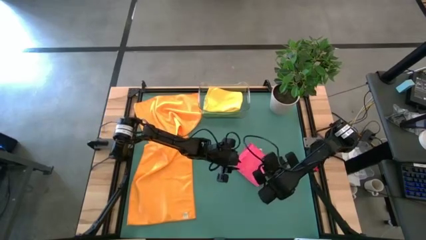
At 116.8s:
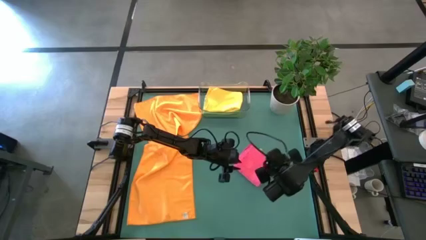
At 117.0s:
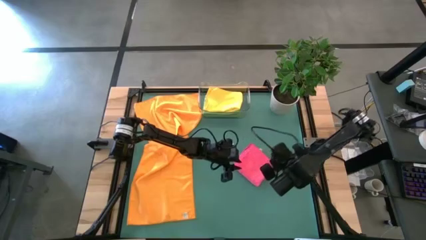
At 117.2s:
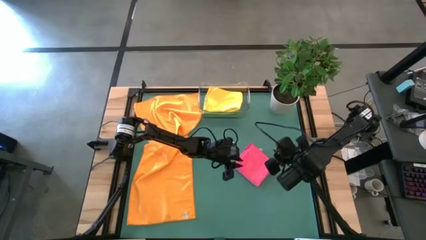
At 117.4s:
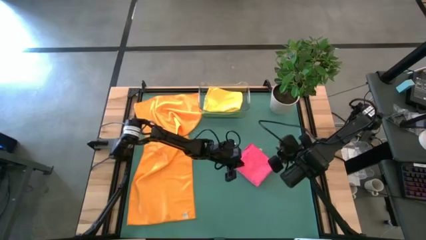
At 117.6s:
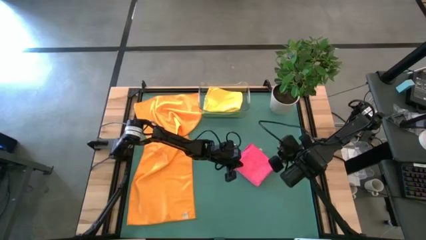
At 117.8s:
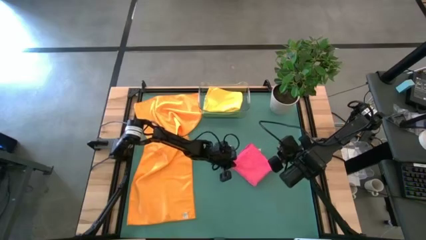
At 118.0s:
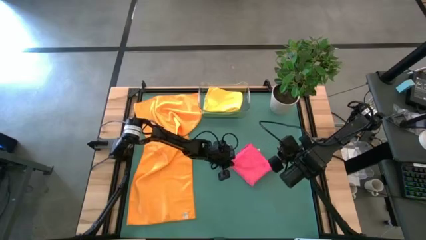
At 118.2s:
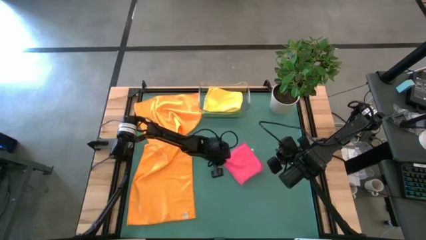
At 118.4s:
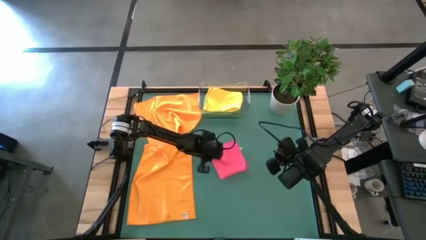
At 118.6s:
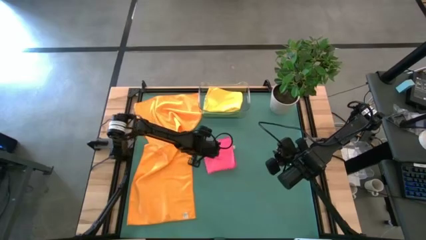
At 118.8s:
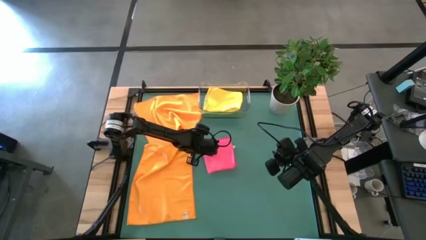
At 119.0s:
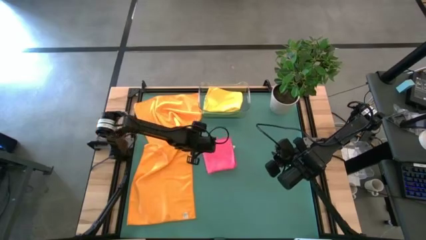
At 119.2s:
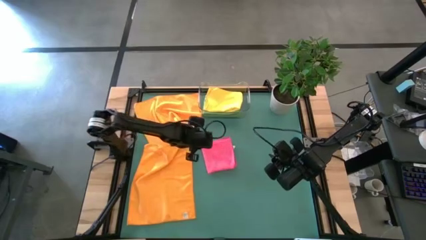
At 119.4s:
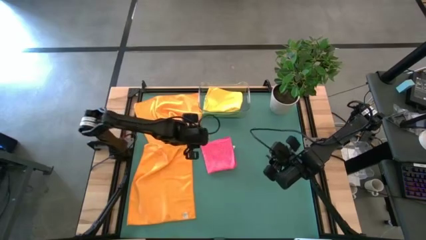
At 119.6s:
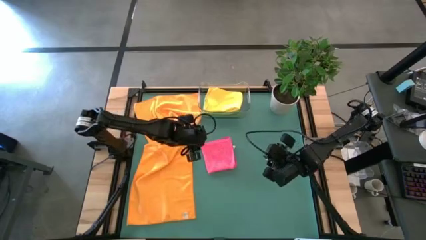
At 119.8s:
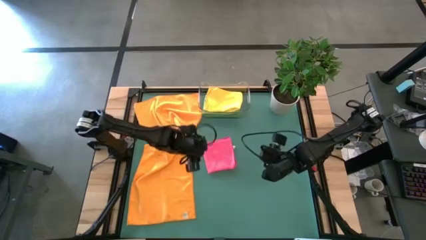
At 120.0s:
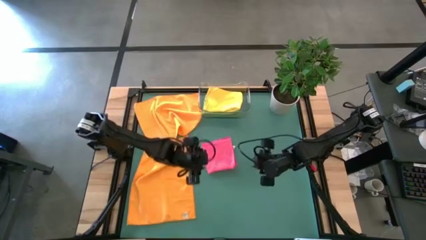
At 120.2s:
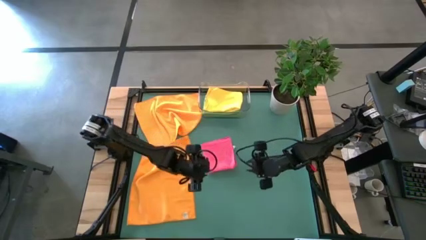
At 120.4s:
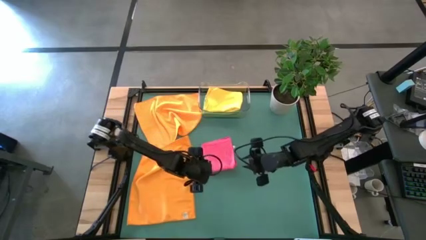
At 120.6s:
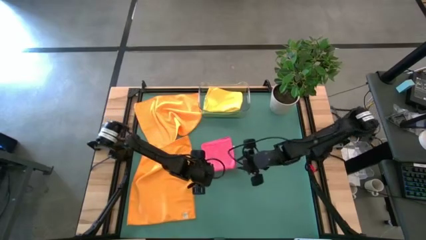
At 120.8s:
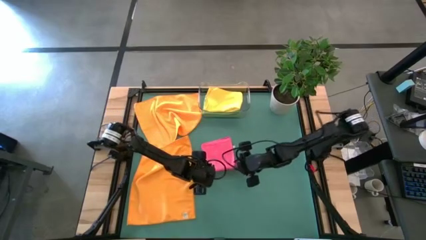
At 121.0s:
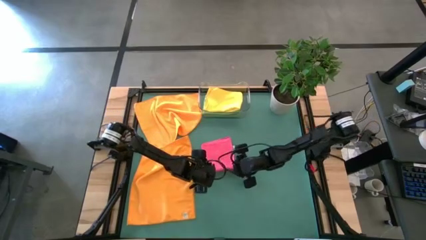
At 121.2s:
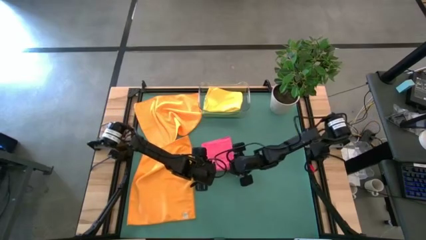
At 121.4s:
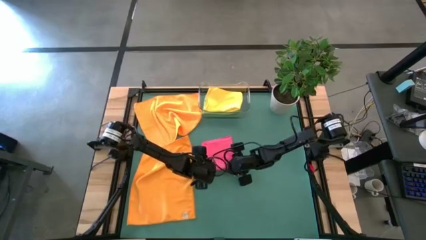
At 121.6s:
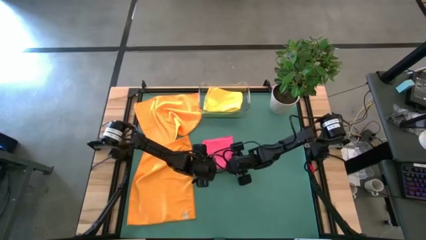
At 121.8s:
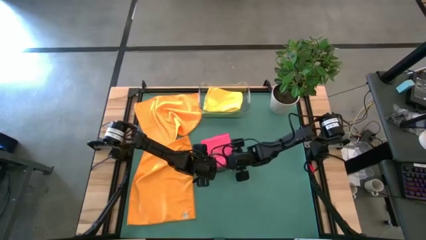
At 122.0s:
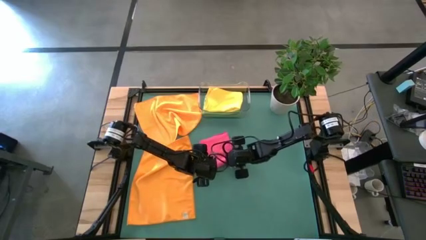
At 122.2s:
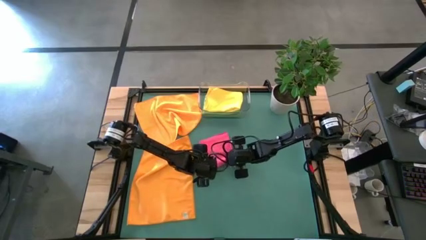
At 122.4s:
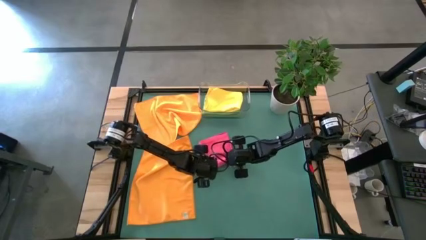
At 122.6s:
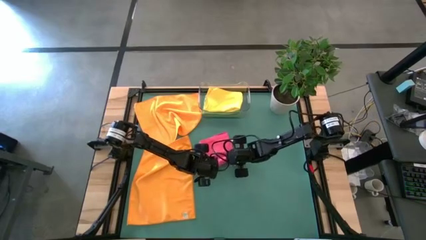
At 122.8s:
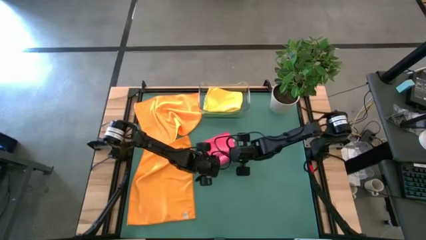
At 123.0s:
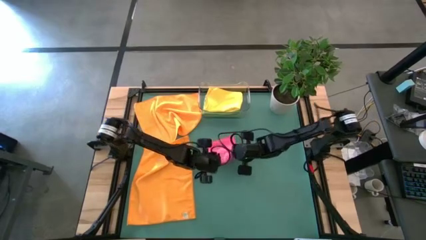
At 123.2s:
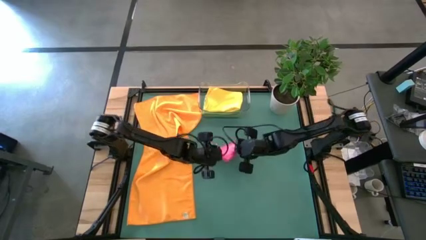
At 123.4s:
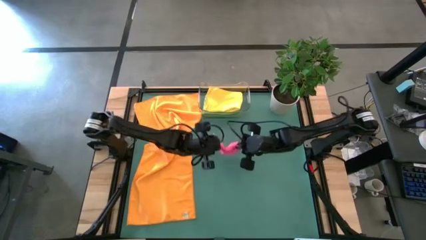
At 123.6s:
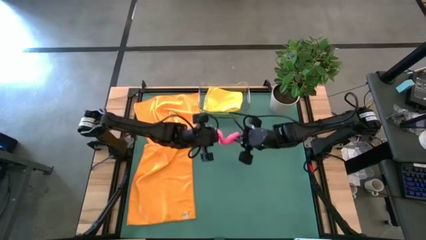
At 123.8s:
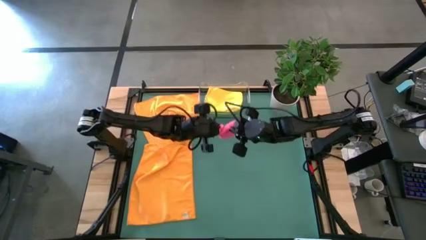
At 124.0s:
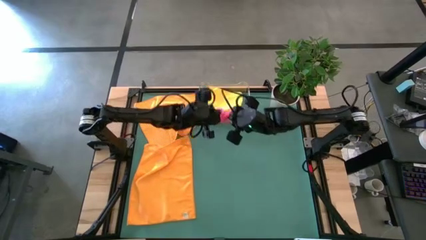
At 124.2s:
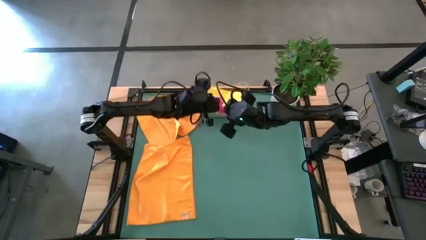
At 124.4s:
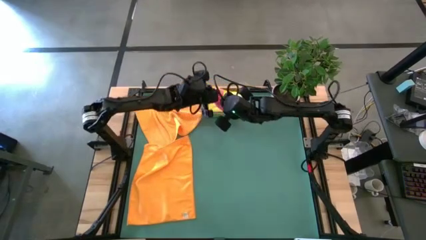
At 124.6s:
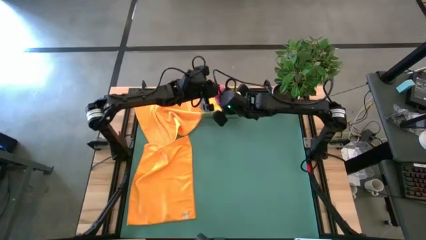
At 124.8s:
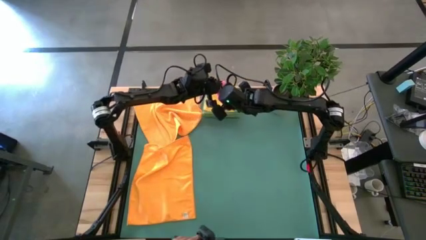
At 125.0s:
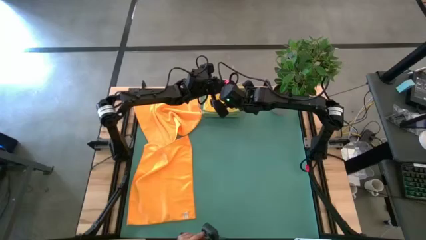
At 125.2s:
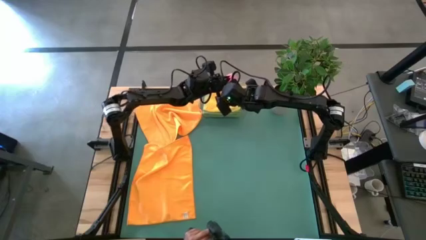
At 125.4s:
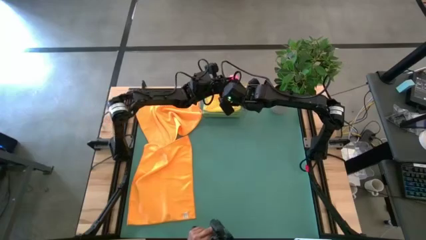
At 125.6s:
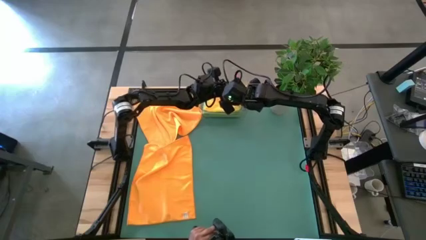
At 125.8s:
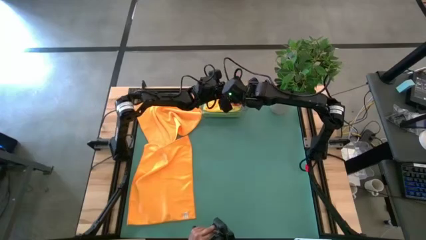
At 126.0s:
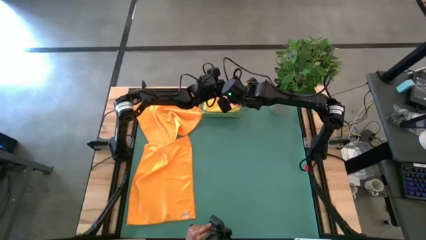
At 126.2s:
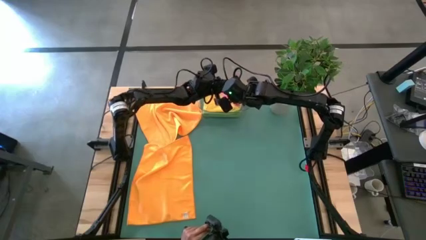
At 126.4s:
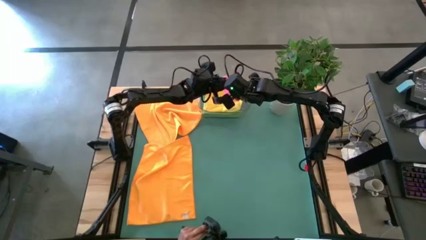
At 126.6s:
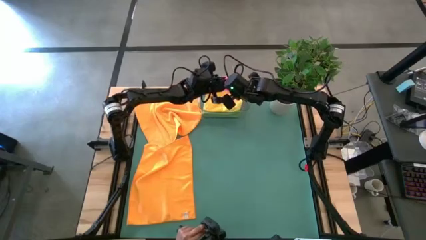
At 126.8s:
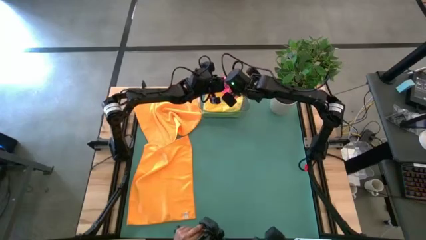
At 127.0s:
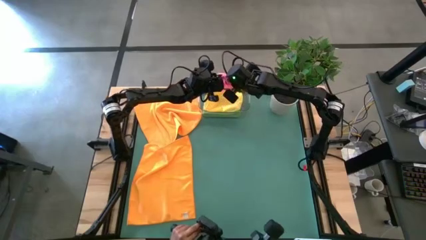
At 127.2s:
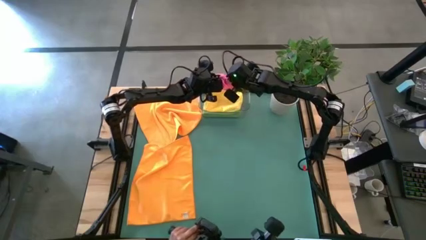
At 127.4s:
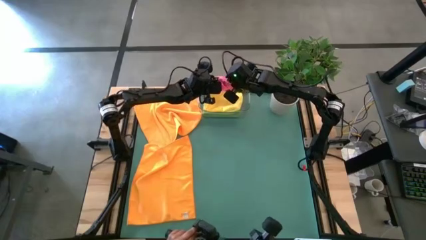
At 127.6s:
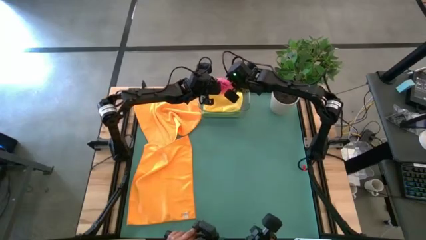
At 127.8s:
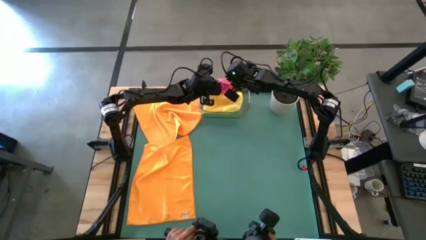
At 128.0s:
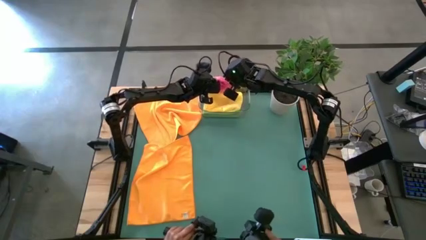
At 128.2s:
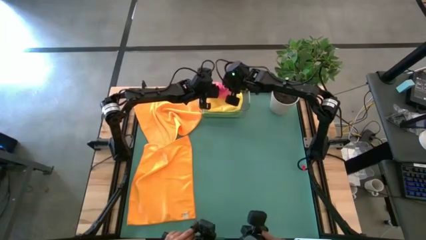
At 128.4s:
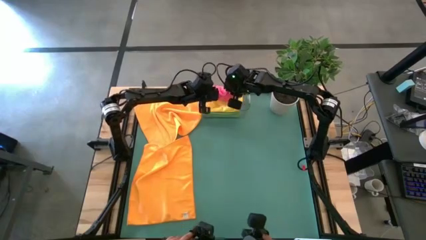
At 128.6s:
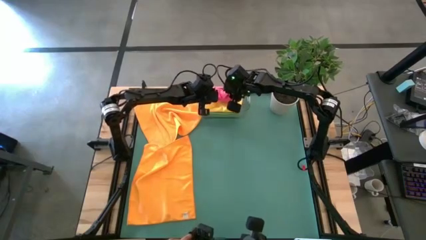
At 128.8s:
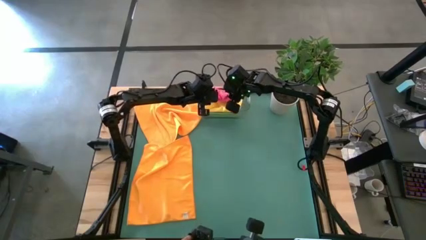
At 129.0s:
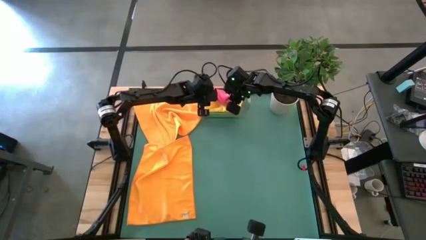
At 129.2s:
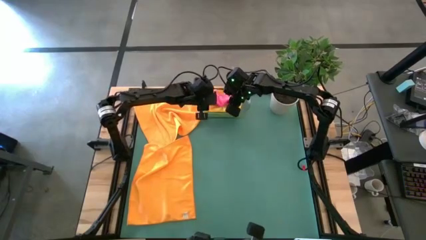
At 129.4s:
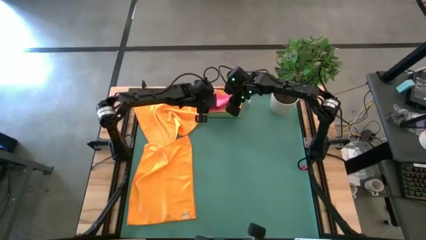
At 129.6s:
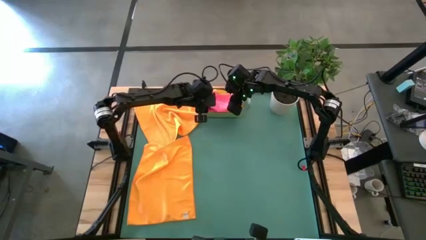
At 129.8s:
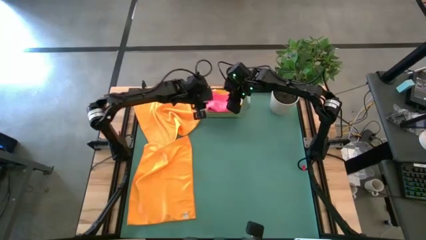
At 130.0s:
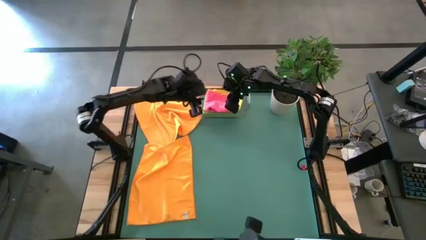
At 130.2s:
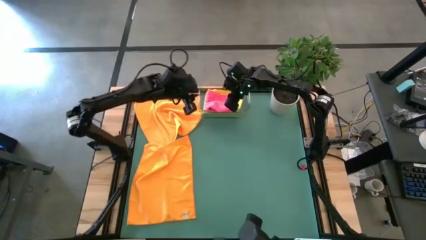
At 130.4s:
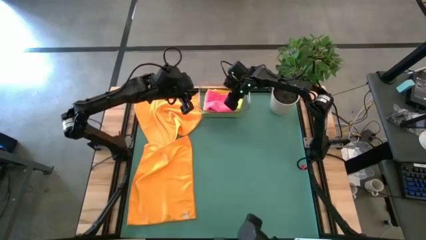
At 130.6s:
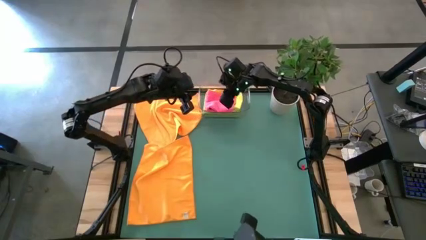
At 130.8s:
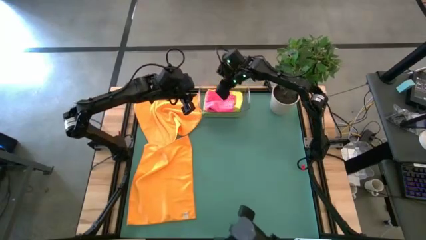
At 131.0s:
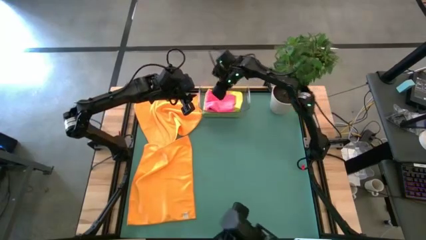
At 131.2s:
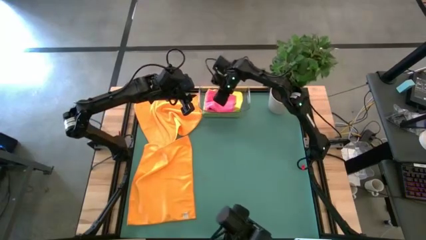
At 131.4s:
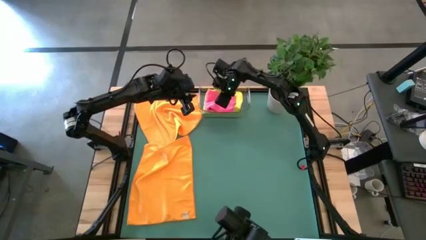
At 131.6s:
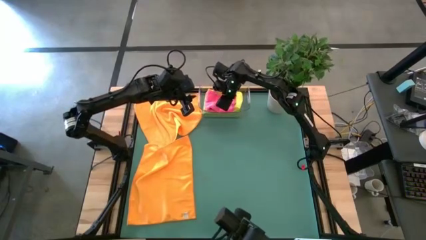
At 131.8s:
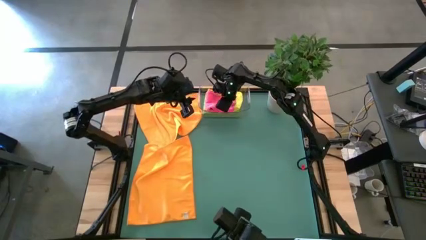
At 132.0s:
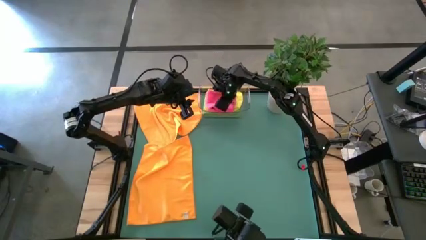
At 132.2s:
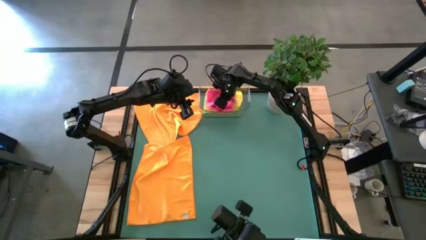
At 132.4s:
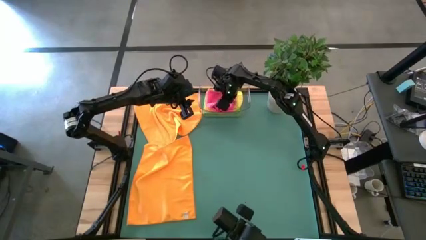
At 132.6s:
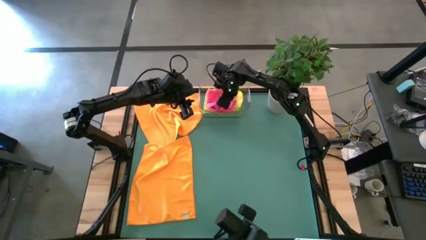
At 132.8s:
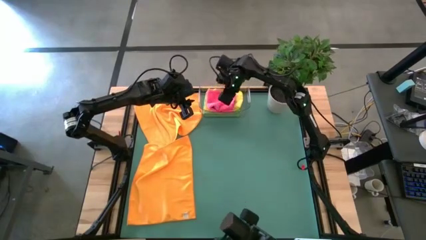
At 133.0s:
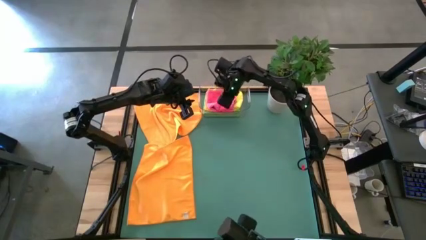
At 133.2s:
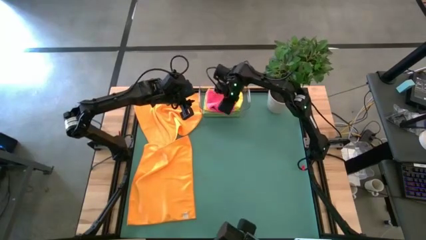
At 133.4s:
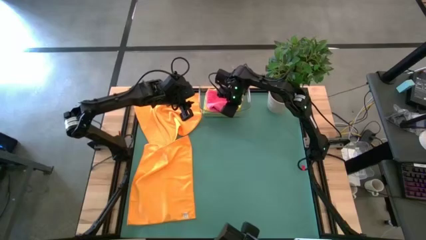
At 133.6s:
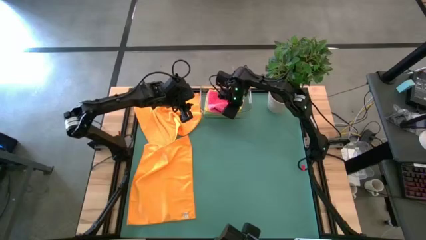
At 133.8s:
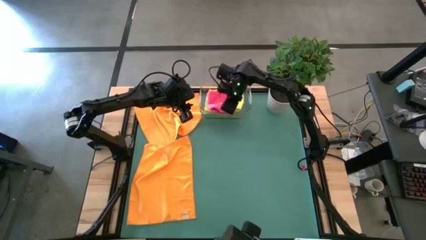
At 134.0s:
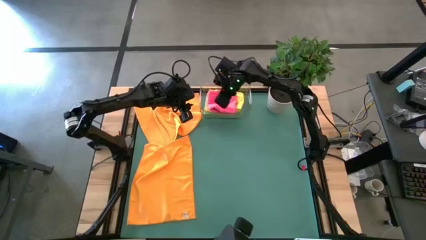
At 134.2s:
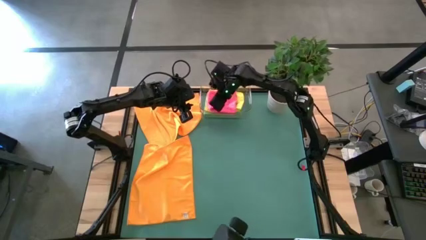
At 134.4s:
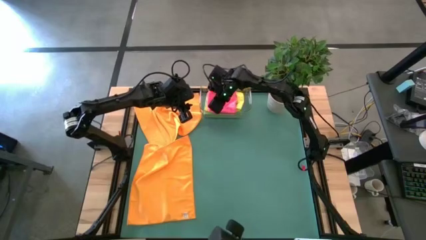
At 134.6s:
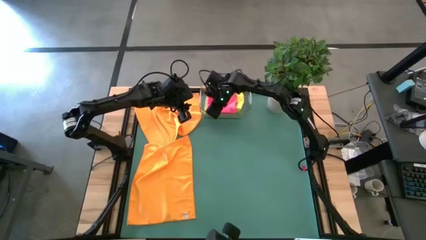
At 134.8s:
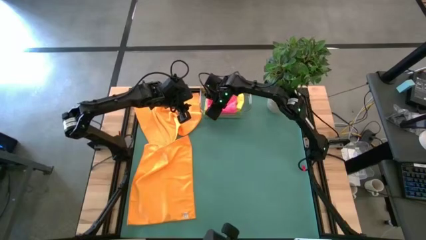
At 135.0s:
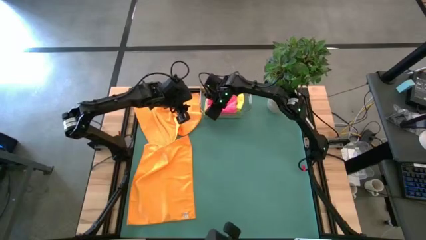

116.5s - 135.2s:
Task: Fold microfiber towels
Put the folded pink towel into the transparent bin
